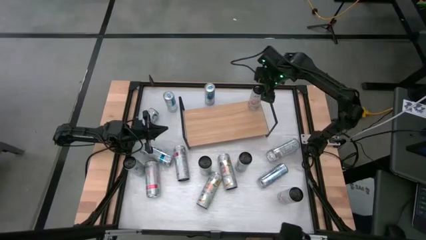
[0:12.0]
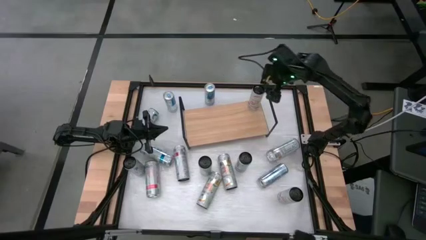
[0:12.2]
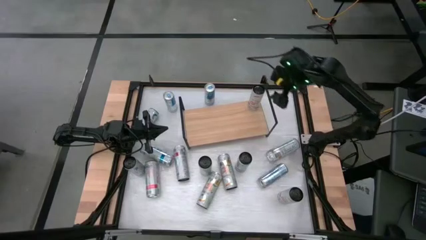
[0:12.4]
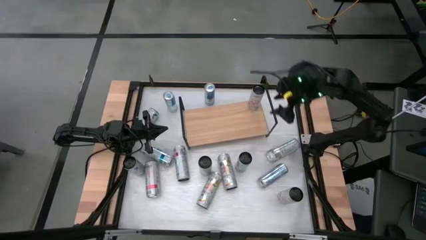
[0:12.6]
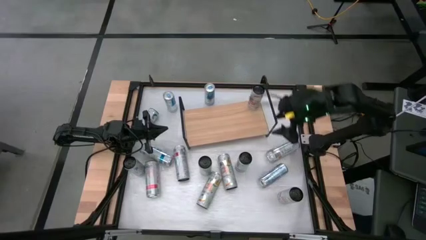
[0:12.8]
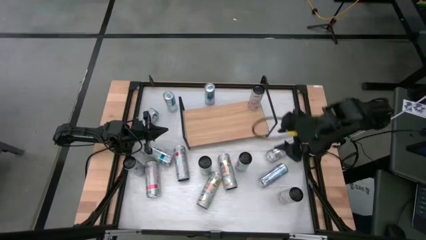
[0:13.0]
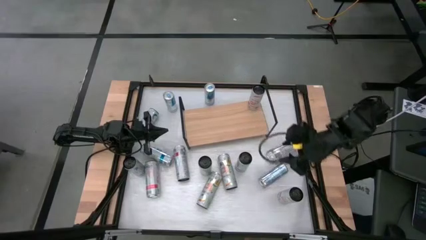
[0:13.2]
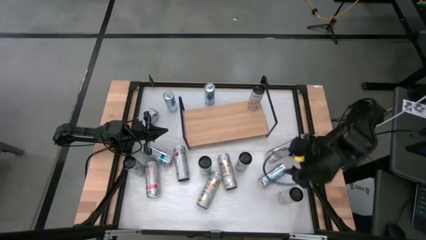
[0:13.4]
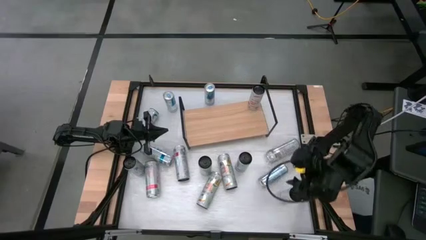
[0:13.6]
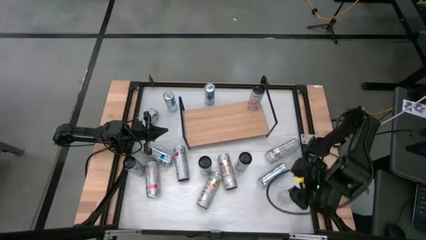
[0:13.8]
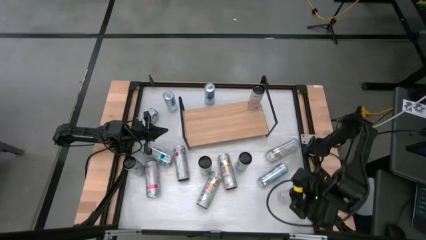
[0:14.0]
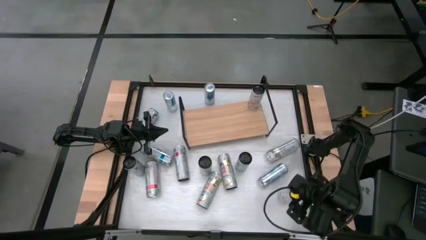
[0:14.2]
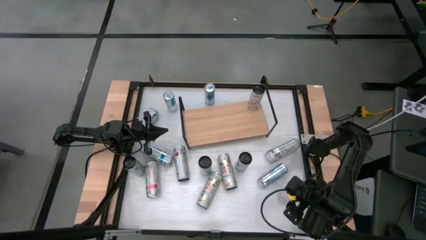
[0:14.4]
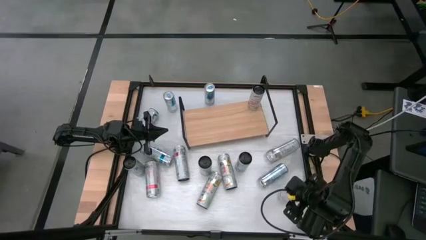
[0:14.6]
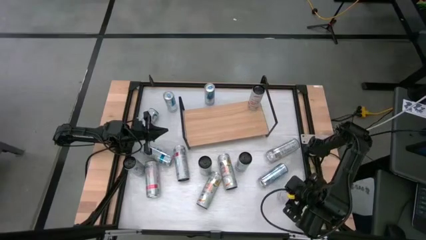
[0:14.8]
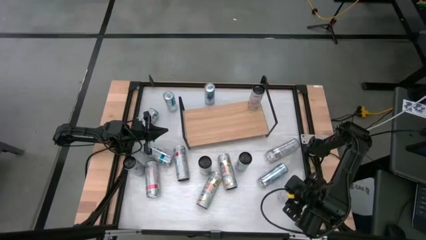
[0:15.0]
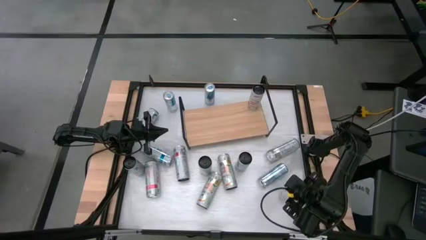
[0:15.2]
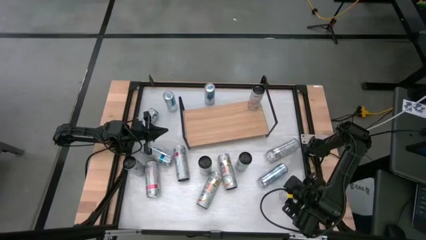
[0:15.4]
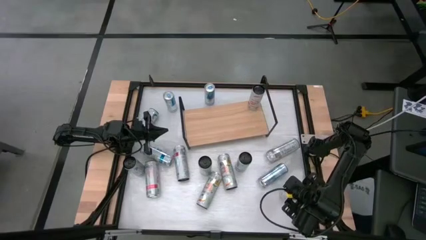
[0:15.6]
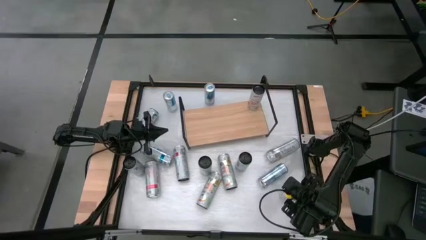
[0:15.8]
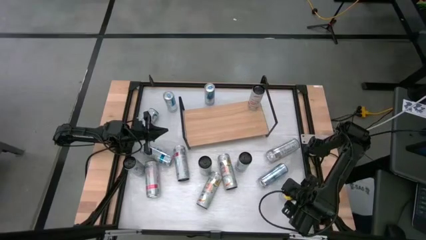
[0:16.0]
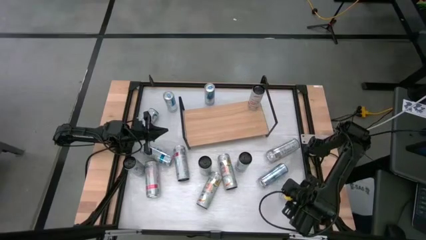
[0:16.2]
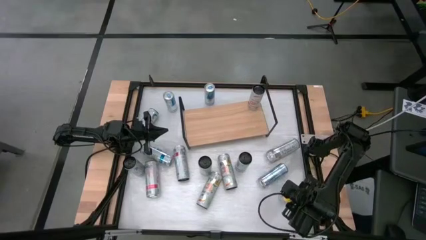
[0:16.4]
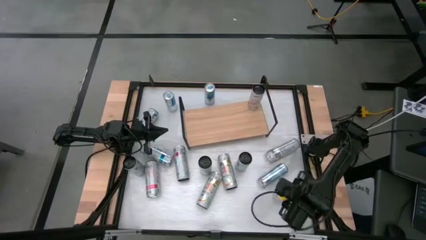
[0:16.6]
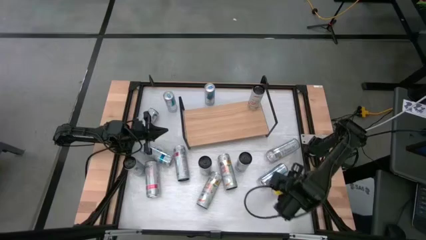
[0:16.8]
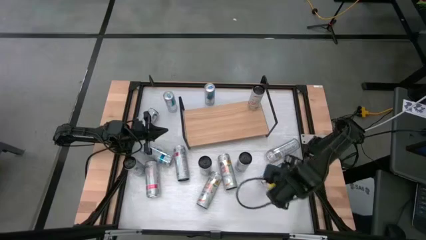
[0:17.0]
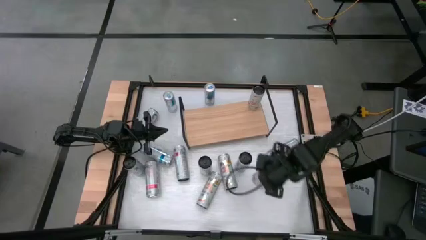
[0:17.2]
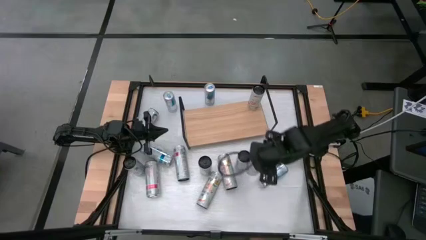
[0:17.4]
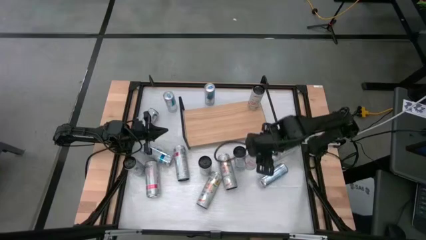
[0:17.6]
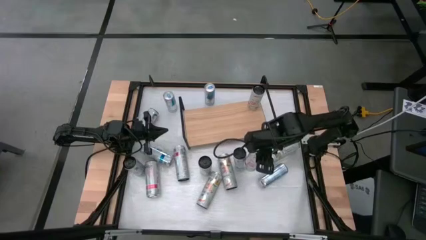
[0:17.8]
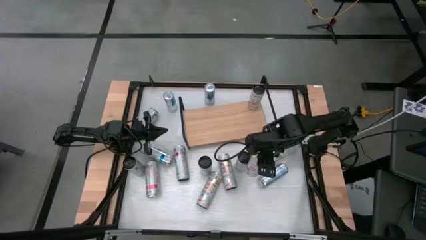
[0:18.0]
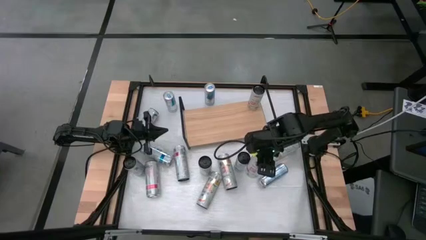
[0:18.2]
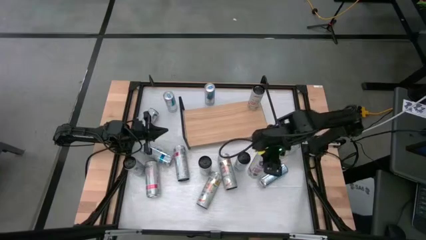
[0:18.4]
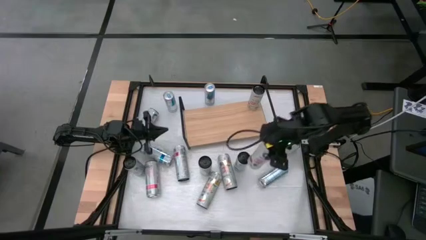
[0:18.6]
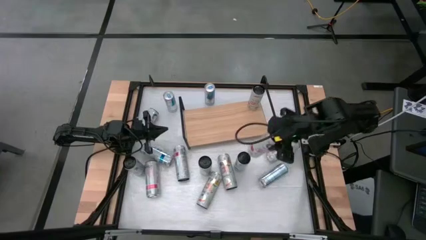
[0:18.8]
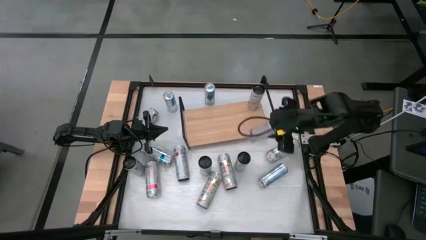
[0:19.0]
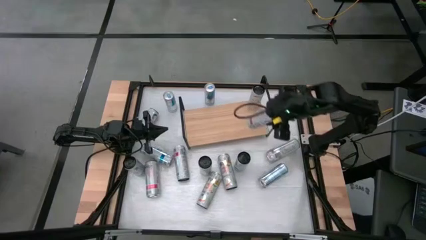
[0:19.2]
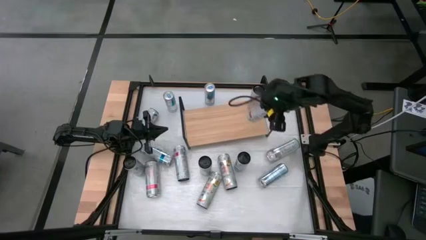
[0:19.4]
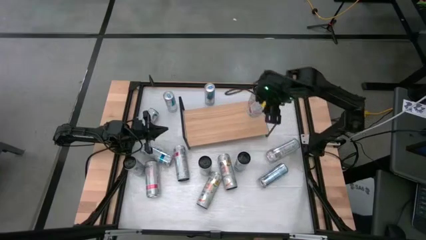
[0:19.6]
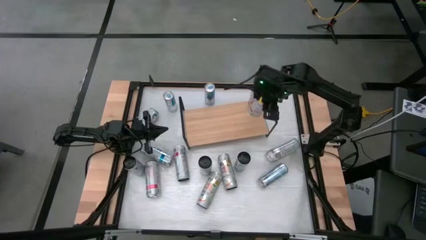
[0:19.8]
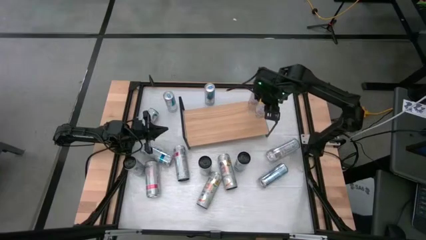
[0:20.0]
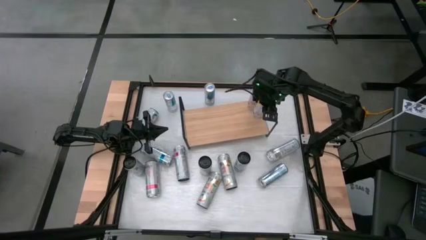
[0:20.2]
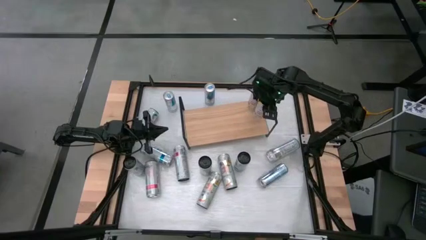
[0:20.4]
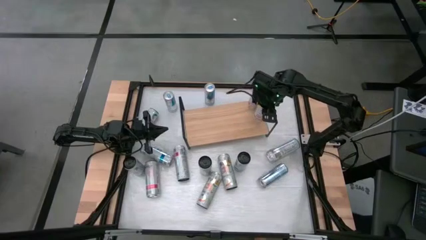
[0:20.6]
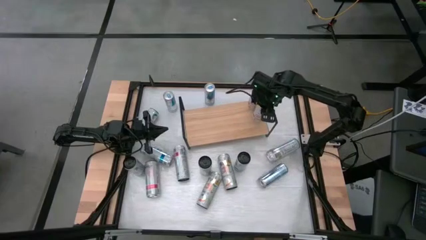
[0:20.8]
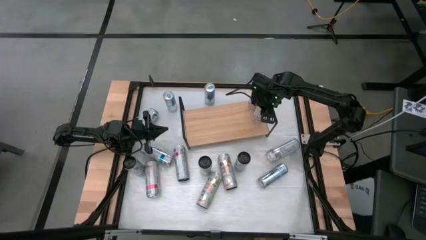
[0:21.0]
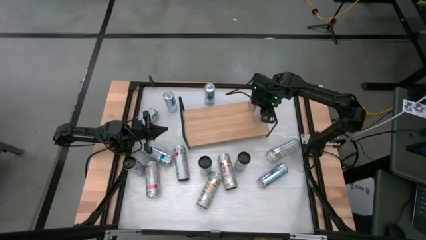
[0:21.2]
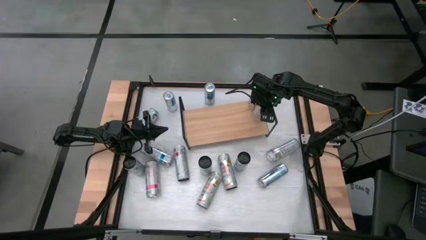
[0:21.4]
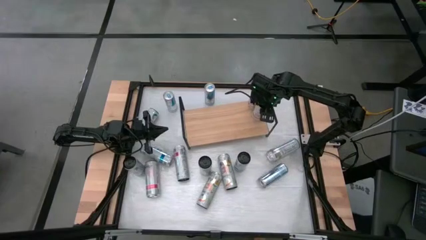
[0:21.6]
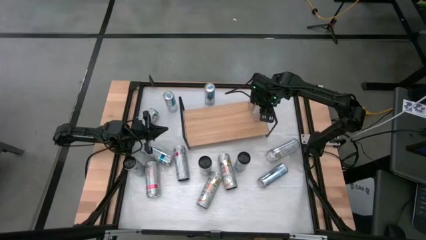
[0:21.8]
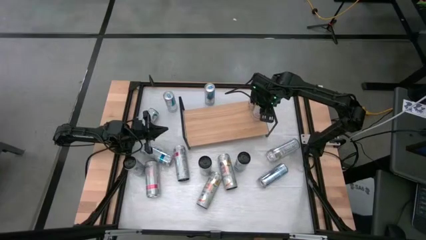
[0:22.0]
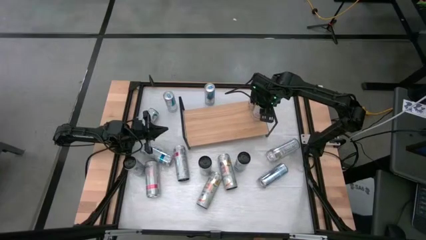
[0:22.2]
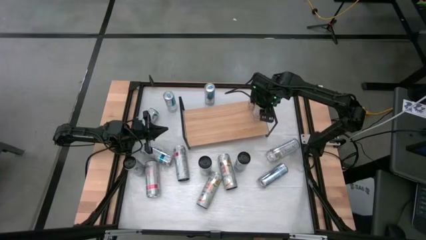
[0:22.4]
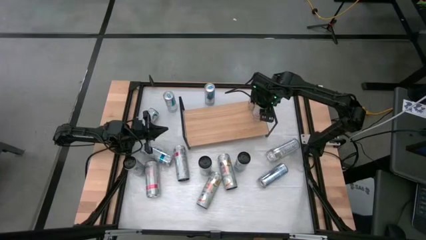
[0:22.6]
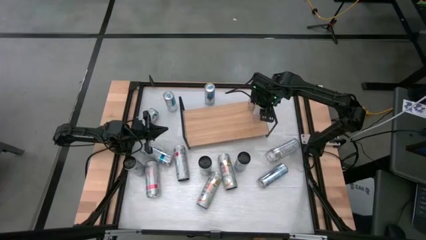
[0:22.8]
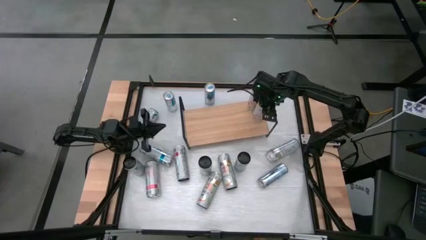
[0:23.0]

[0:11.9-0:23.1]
Task: Place canned beverage on shelf
Put the white-pink soda can on the shelf aligned with the other white-pink soda can

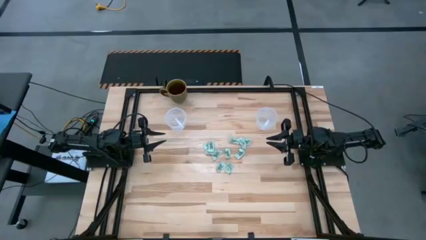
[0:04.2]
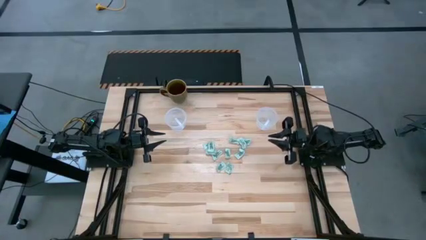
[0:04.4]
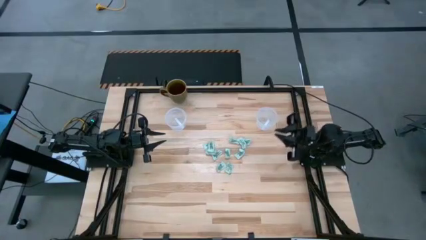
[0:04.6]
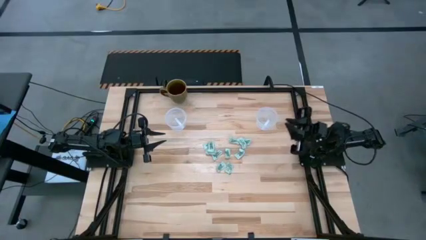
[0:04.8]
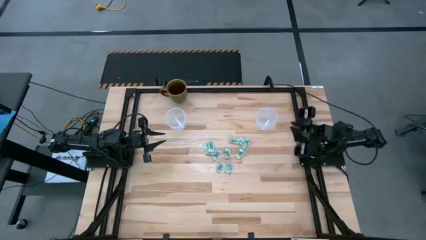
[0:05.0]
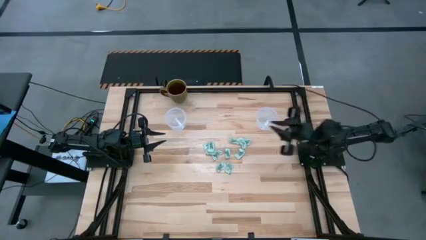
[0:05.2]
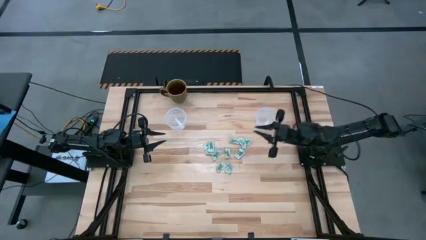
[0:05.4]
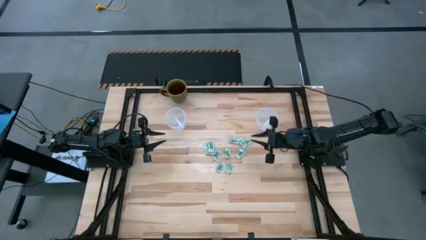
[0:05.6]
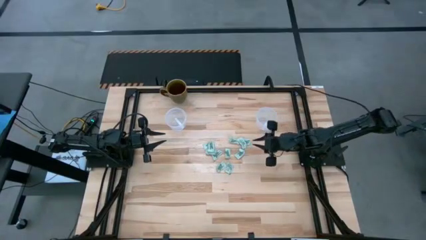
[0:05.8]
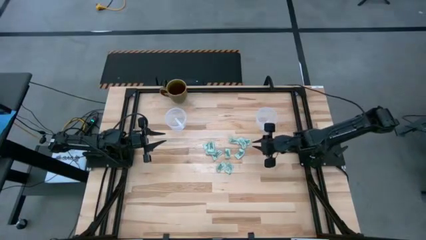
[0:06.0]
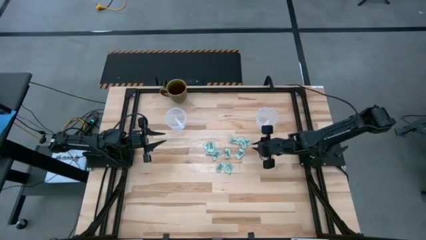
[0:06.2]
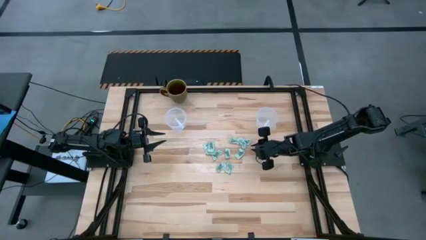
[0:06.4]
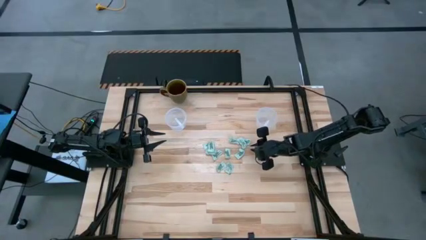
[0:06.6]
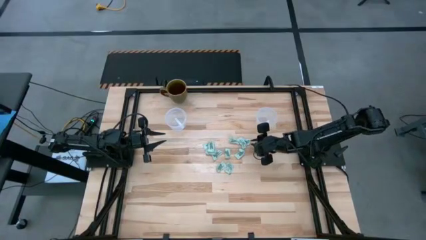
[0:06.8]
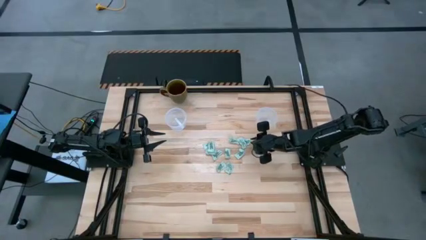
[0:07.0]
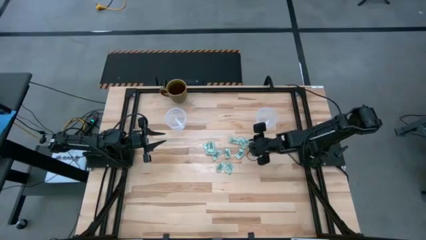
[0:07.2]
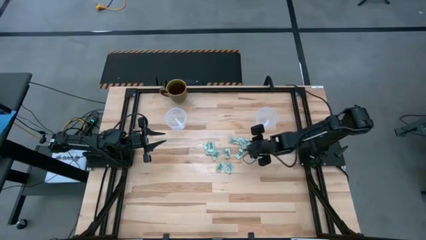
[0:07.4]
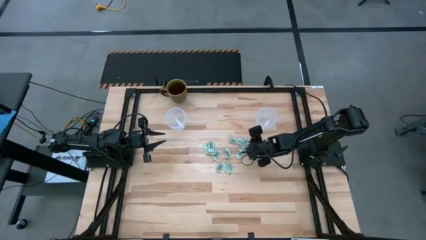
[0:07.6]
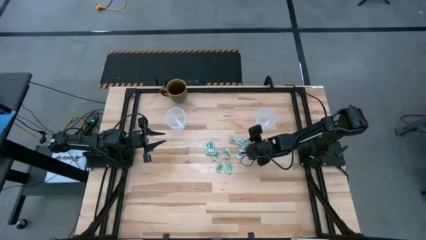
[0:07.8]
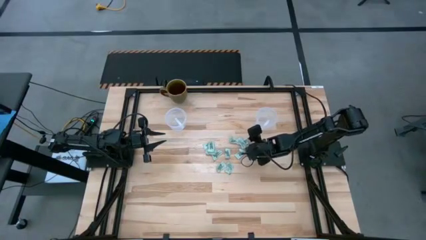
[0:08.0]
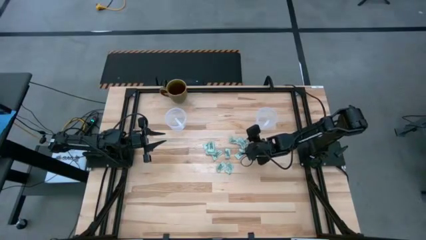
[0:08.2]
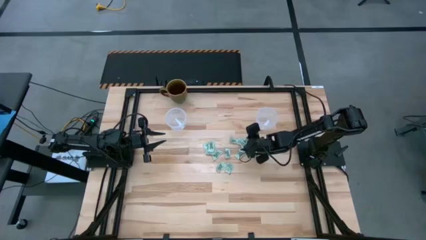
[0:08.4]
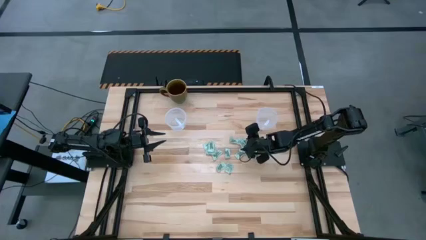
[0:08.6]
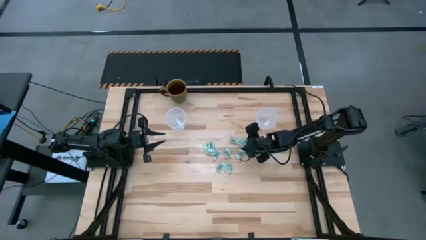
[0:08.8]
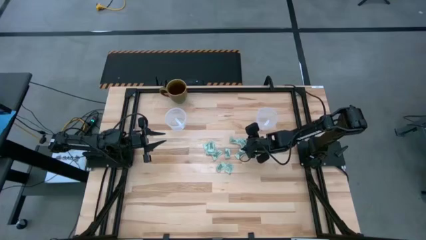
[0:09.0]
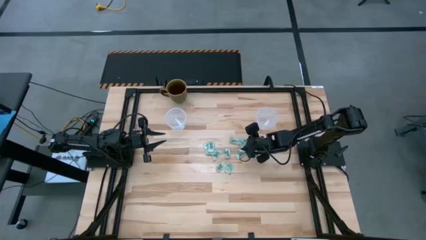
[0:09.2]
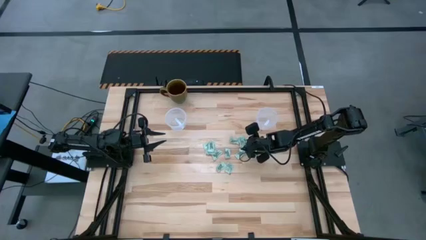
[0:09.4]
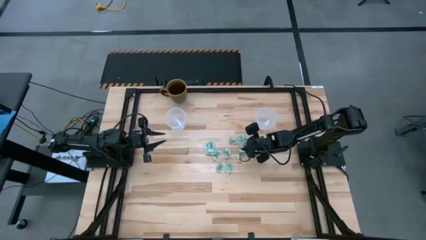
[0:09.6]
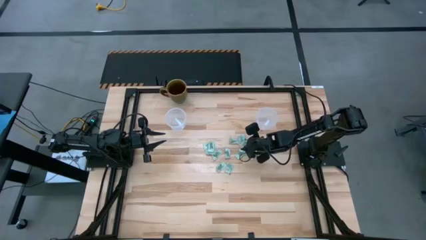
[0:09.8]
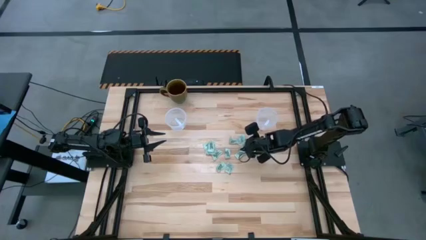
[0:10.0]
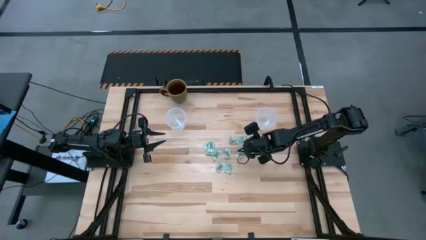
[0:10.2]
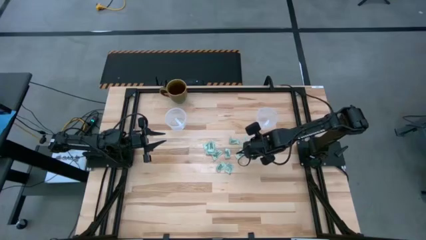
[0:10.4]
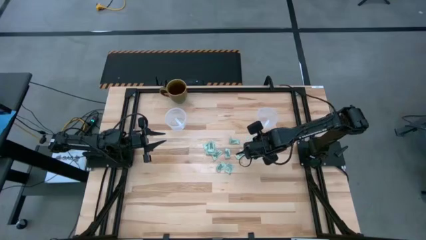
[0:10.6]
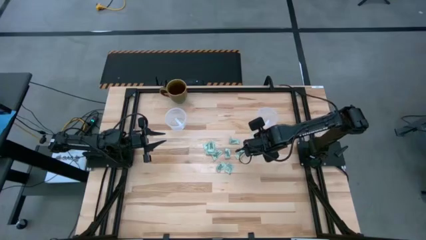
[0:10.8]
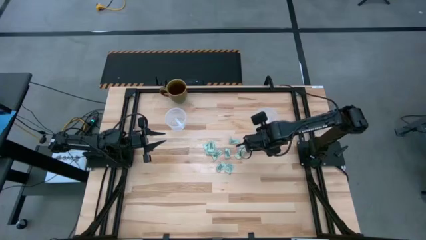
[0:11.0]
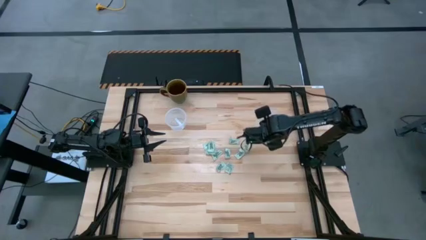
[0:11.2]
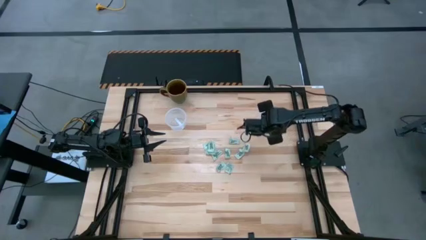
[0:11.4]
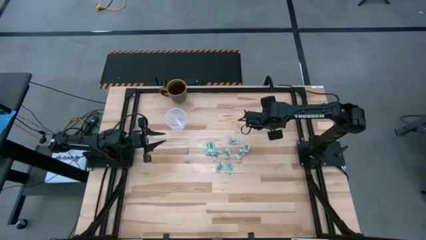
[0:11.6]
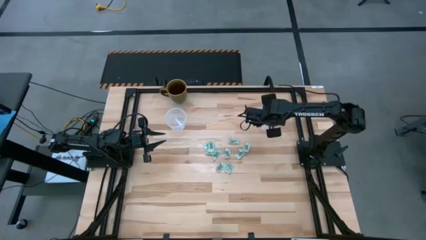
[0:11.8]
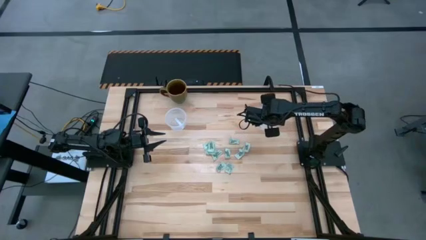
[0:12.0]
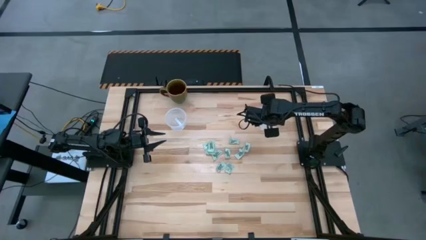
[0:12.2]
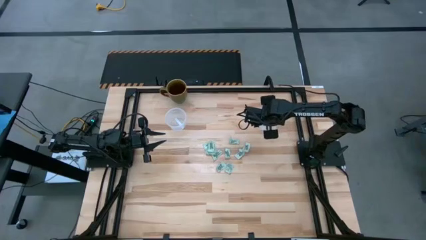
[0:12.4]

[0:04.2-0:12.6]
Task: Pick and place items into bin
Put the stevia packet into the right transparent bin
